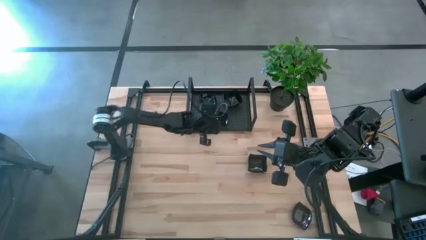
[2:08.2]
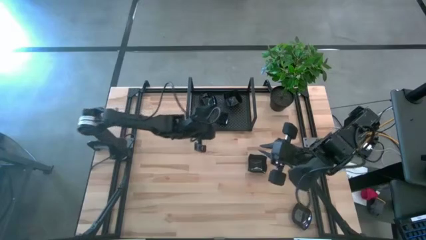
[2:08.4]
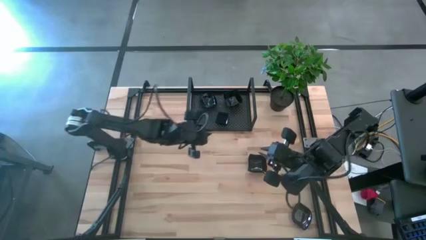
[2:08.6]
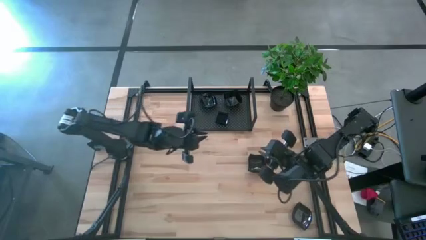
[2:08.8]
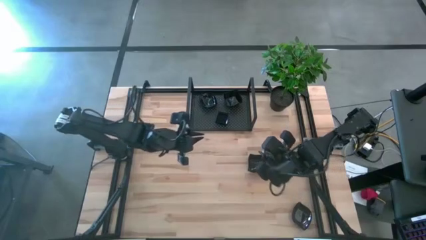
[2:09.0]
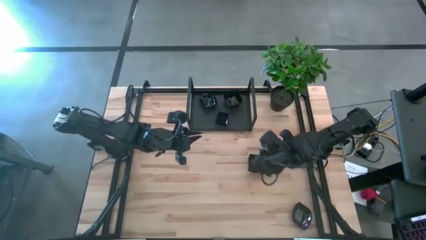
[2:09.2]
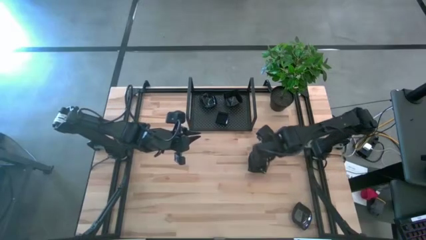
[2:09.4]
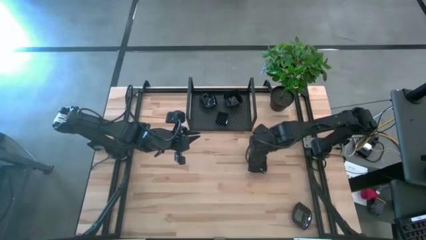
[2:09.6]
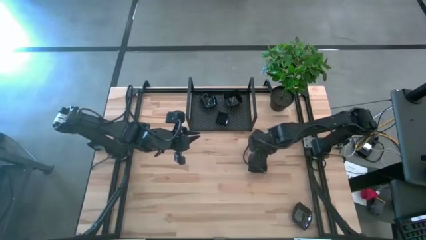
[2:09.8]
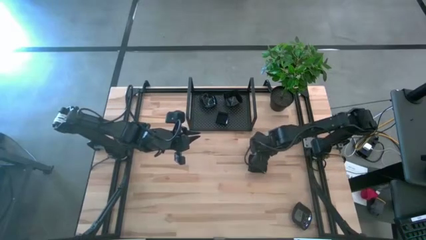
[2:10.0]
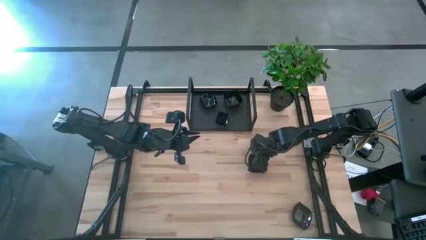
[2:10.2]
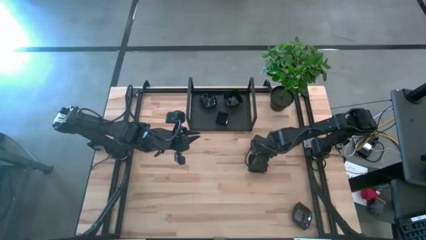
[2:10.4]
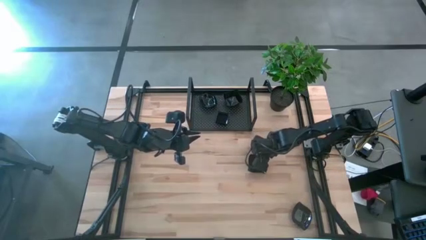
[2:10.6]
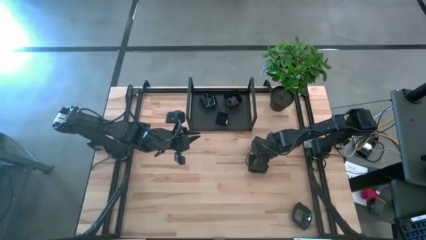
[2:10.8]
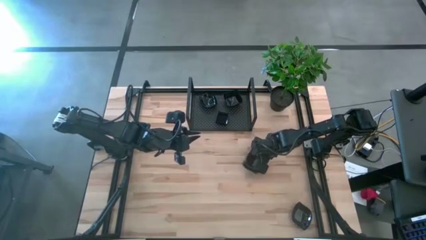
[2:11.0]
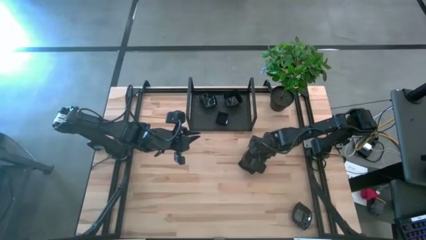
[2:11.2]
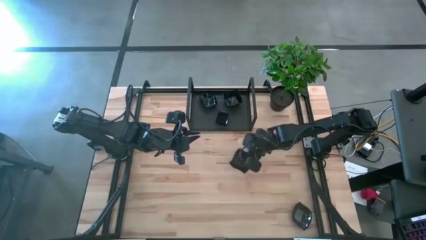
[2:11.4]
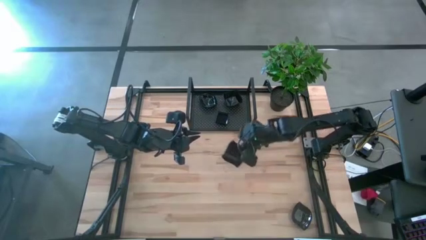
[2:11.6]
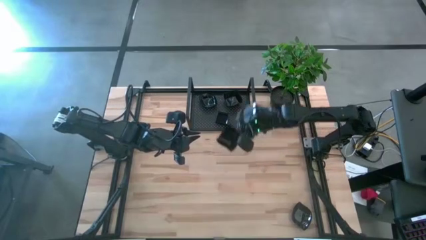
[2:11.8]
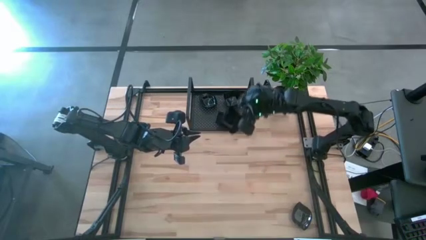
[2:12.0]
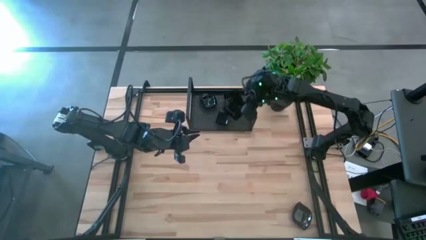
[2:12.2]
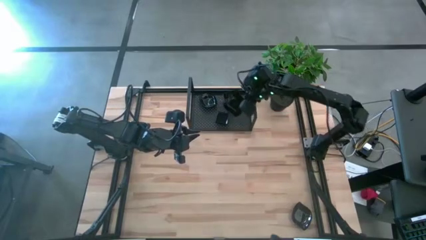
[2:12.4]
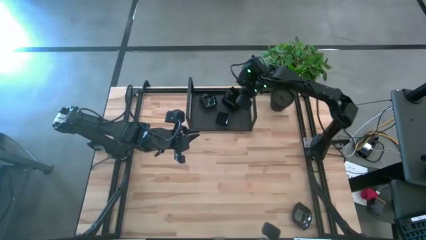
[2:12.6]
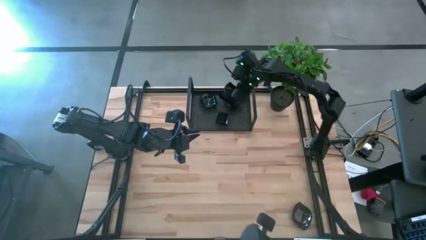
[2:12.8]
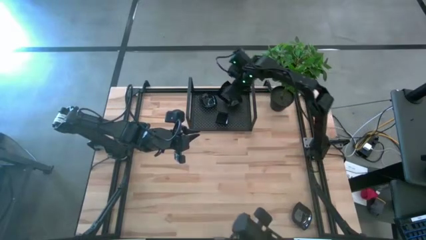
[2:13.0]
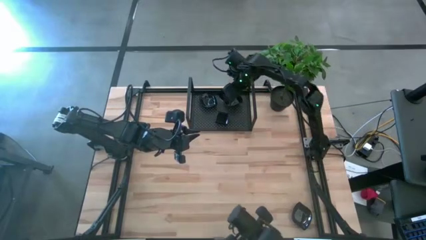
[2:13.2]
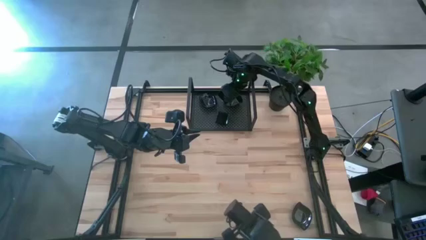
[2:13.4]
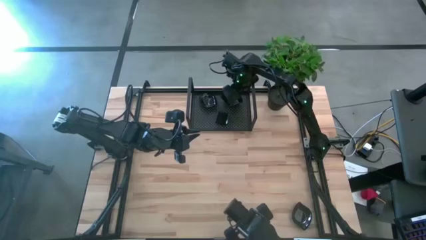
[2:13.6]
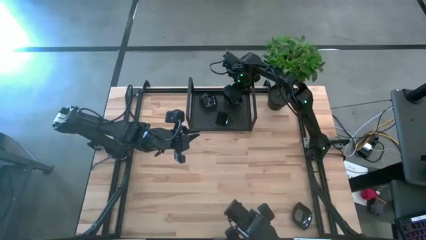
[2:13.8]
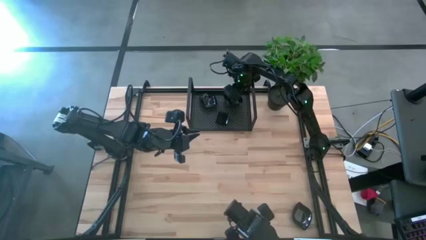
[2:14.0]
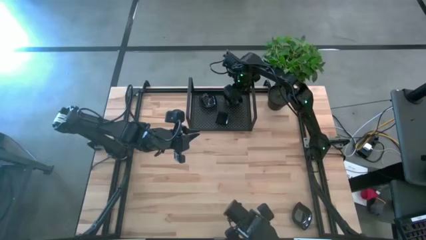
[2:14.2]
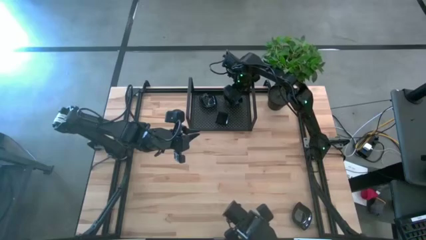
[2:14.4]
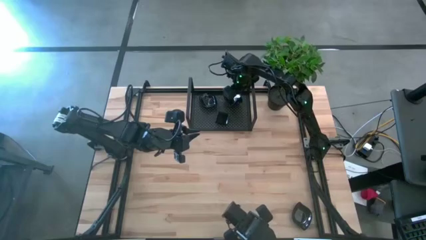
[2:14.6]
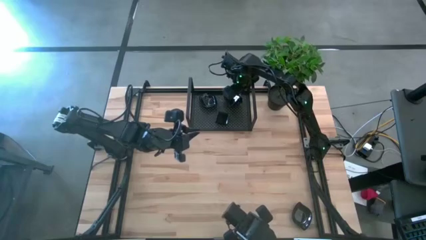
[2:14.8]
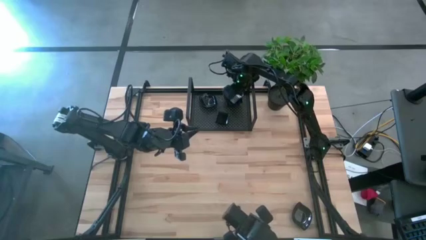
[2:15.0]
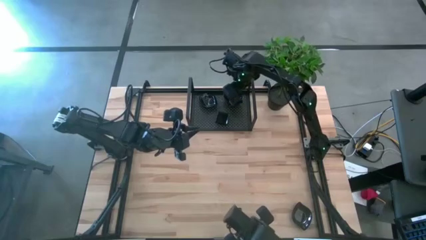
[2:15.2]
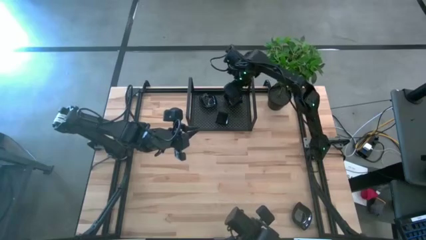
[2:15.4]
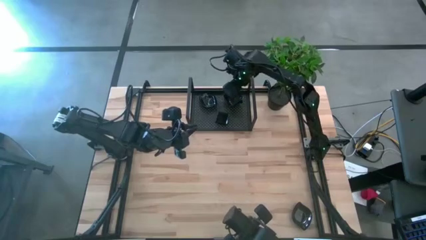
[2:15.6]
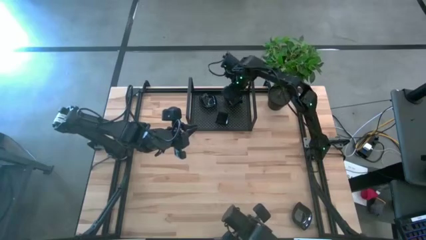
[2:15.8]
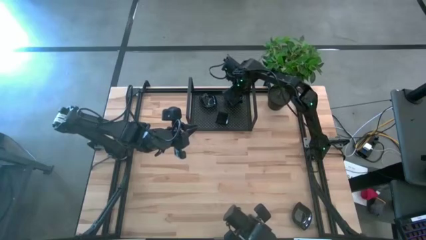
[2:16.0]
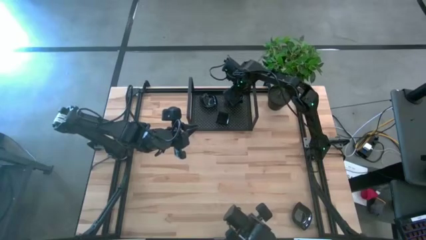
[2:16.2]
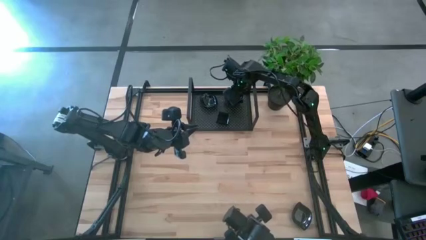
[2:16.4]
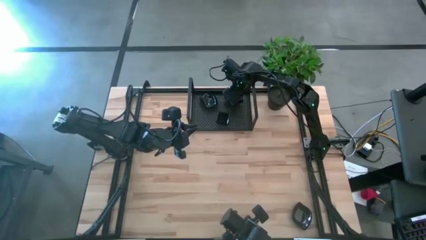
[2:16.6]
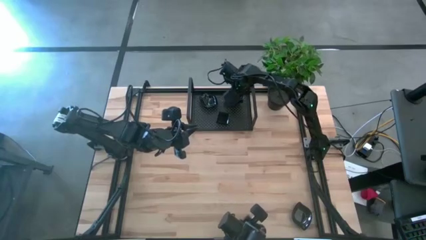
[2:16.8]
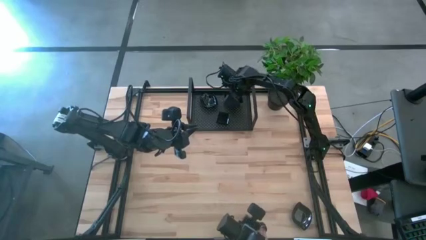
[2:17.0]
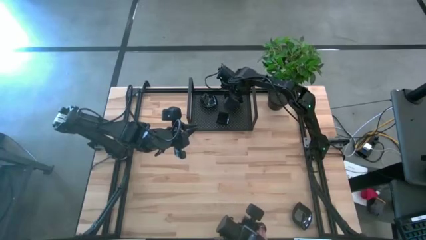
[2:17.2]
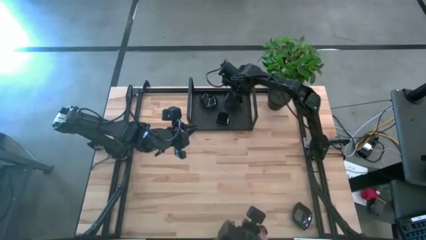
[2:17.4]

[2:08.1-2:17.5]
Task: Pick & Place Mini shaped plates
Stack the black distorted square plate on top of the black distorted square plate on the shelf

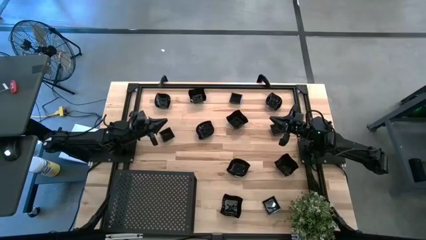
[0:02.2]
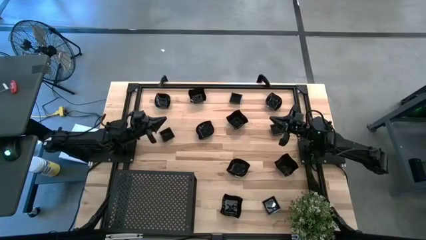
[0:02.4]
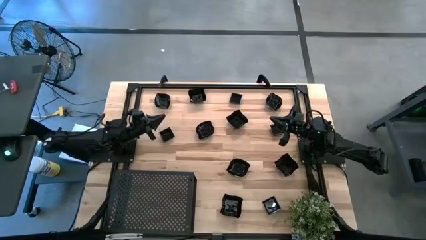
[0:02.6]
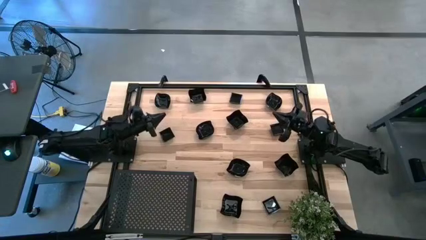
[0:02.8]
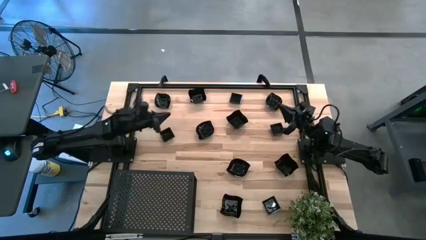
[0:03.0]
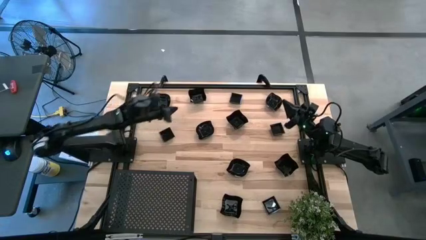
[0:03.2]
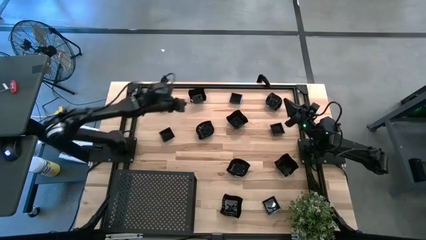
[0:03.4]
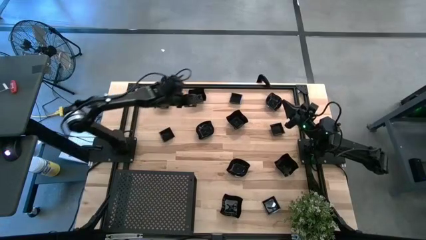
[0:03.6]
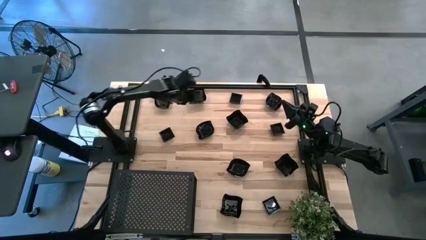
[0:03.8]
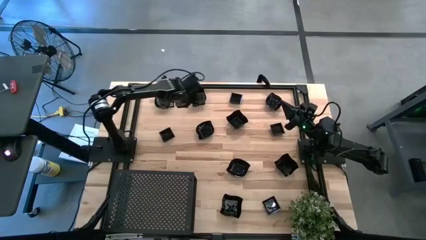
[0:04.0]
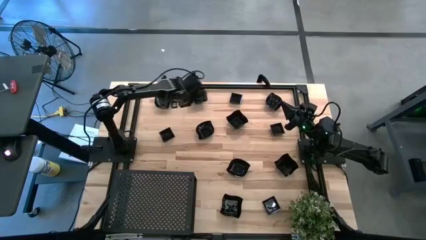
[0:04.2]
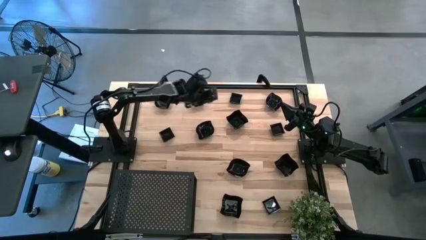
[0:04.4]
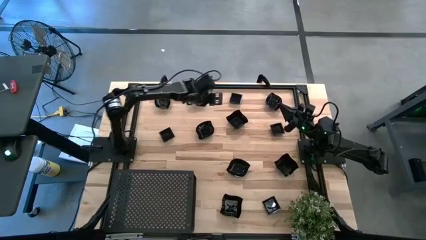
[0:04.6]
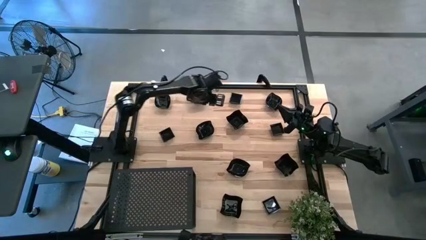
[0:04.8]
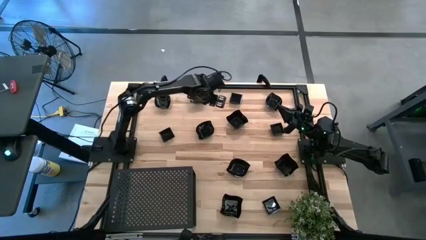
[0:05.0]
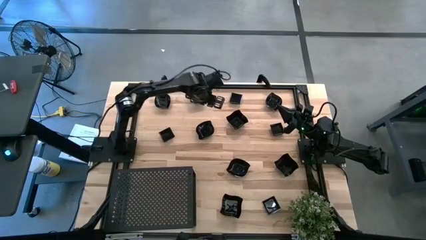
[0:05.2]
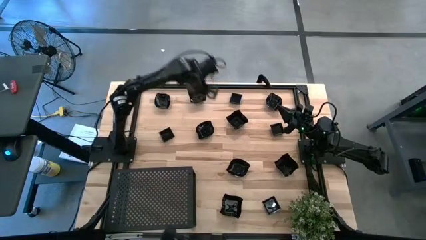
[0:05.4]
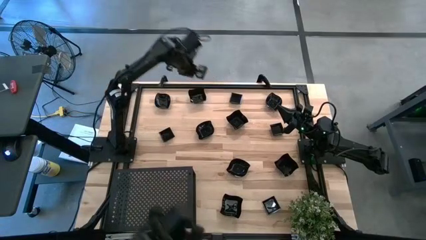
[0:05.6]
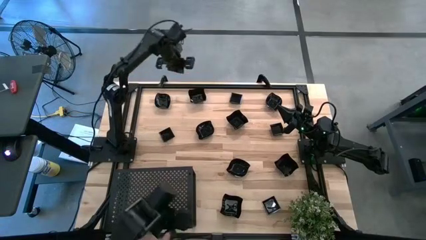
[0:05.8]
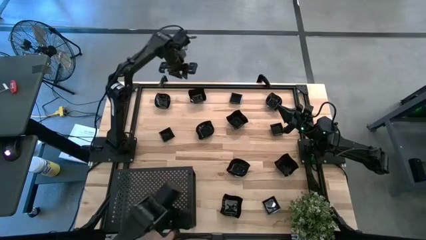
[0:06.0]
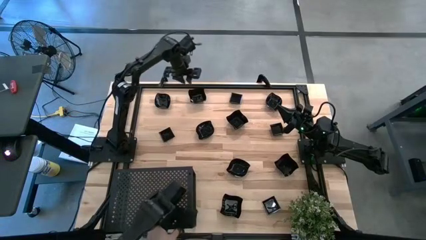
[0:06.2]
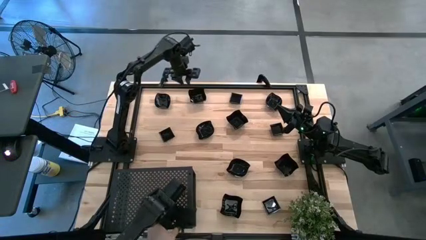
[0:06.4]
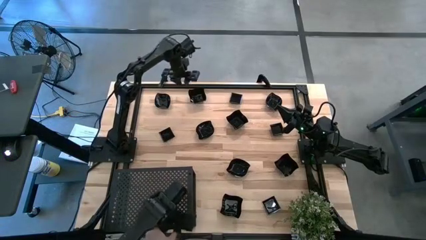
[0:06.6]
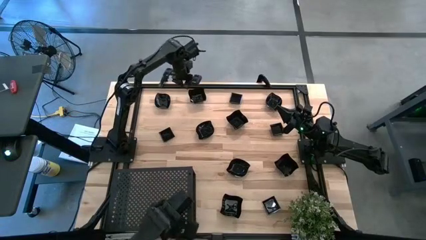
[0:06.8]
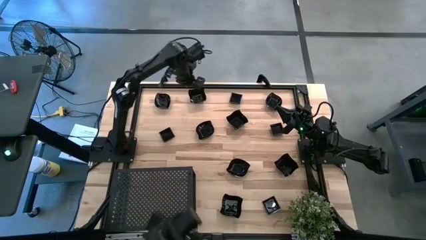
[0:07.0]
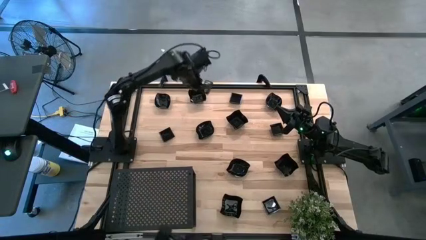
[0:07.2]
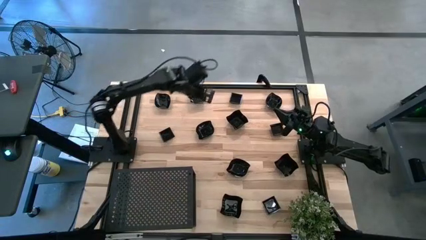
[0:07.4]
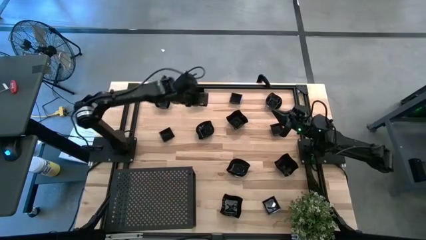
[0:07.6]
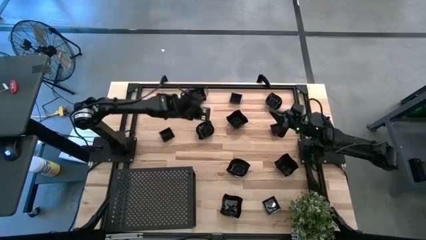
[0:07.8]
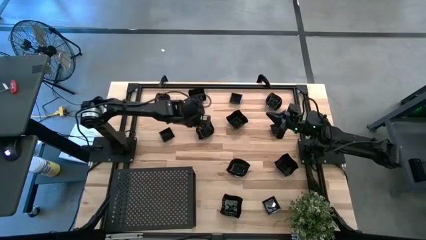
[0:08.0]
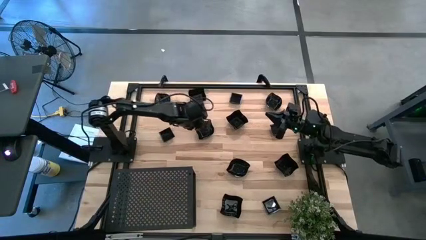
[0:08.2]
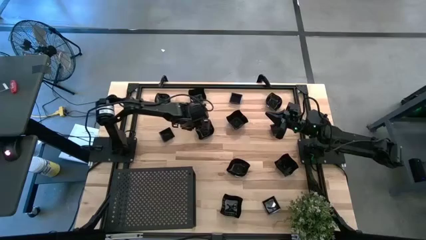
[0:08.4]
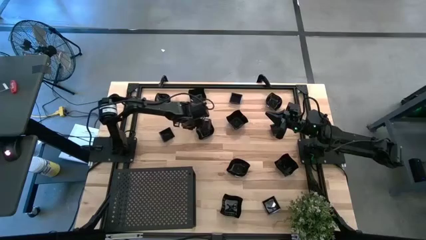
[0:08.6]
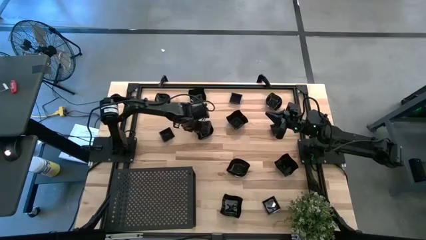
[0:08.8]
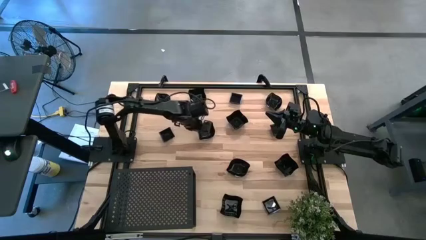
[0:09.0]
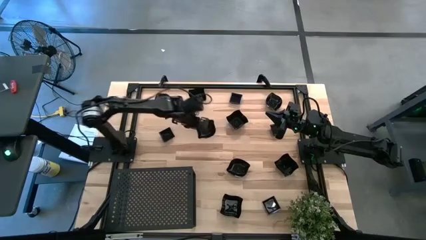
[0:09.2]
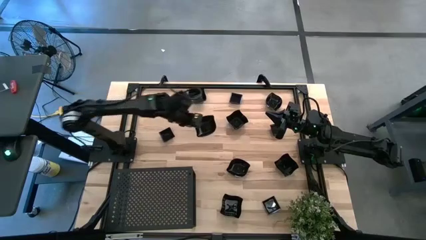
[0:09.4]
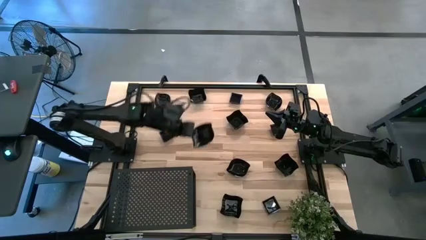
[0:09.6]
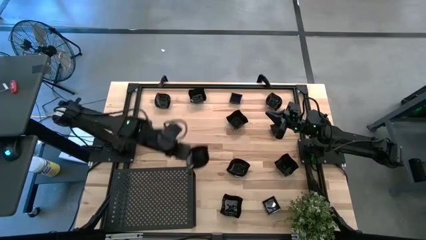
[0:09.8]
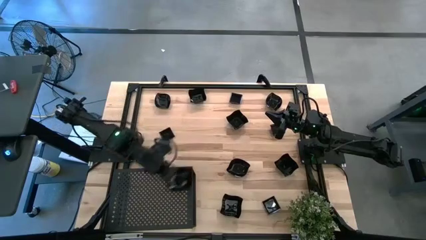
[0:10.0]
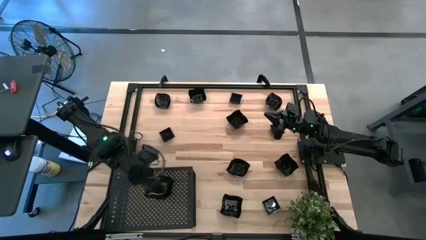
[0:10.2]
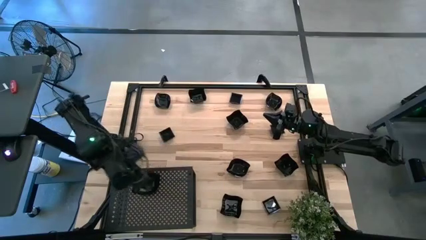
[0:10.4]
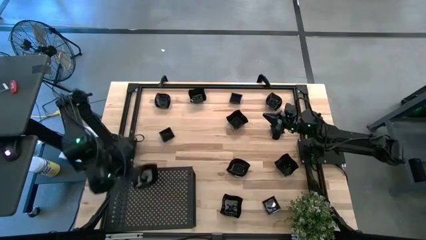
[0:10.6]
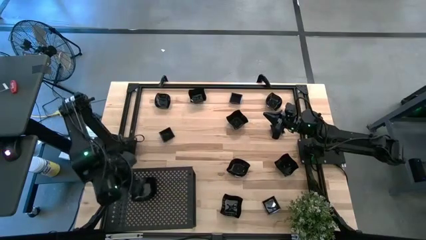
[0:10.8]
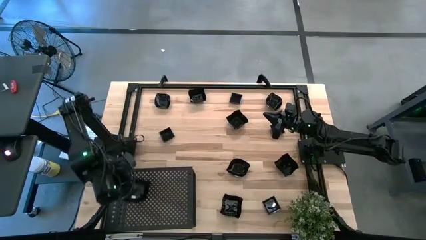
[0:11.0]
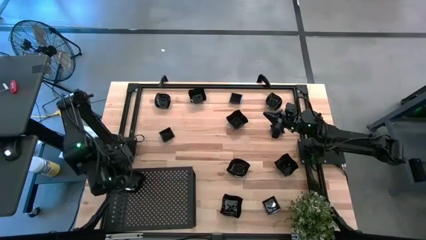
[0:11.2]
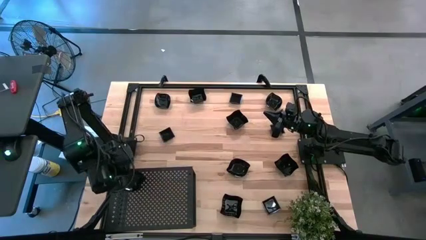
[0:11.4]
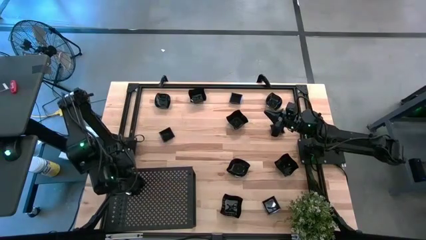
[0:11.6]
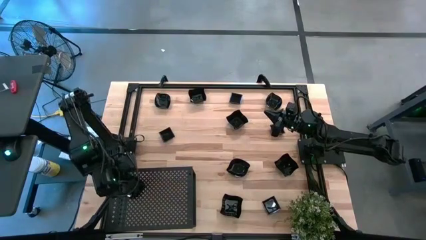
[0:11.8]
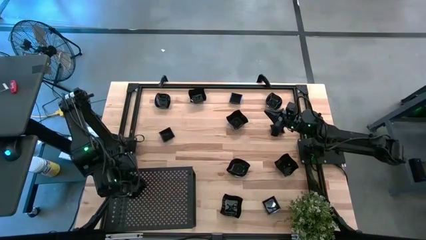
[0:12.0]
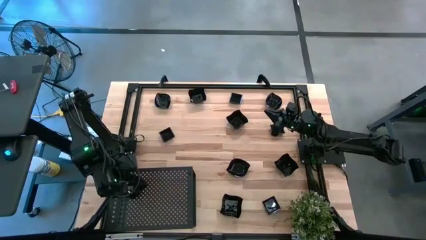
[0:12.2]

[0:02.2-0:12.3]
Task: Pick & Place Mini shaped plates
Put the leaf-shaped plate on the shelf
